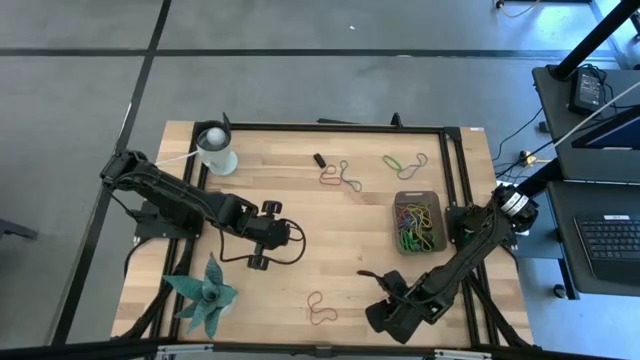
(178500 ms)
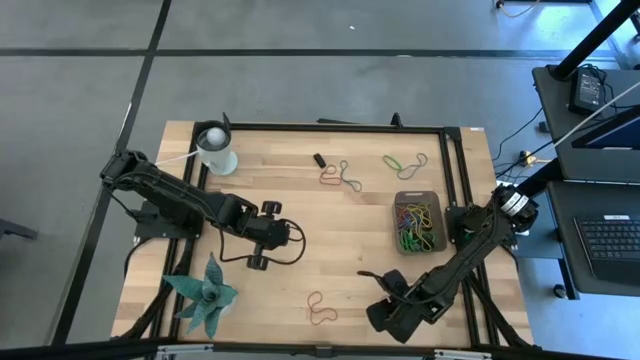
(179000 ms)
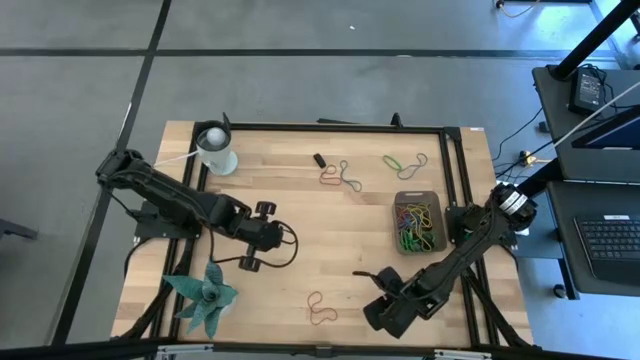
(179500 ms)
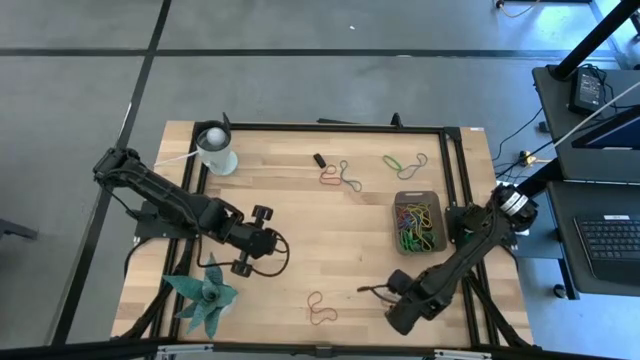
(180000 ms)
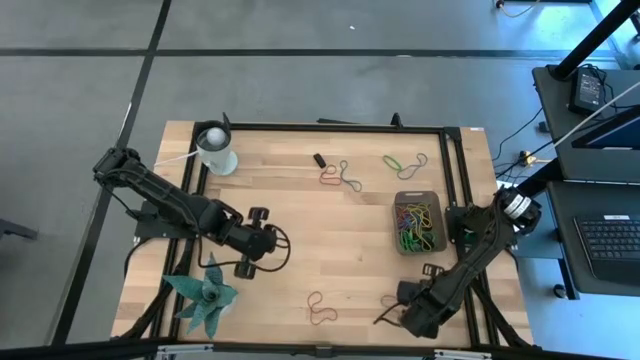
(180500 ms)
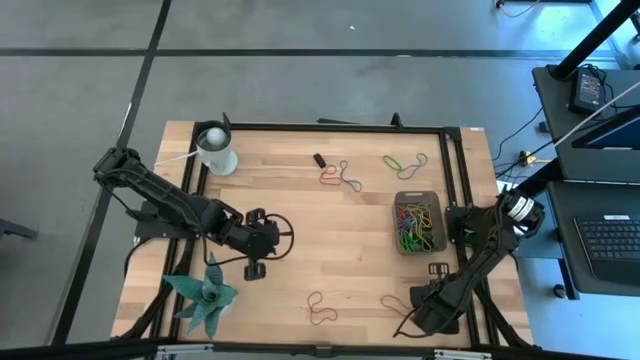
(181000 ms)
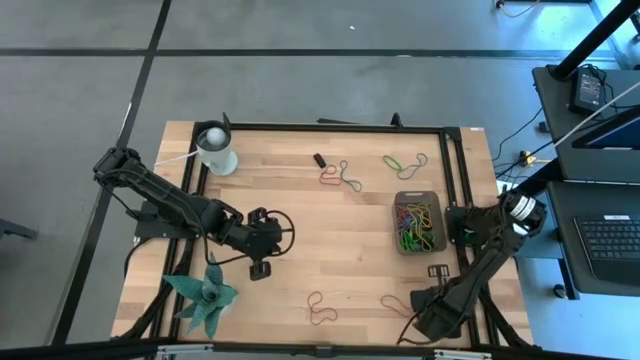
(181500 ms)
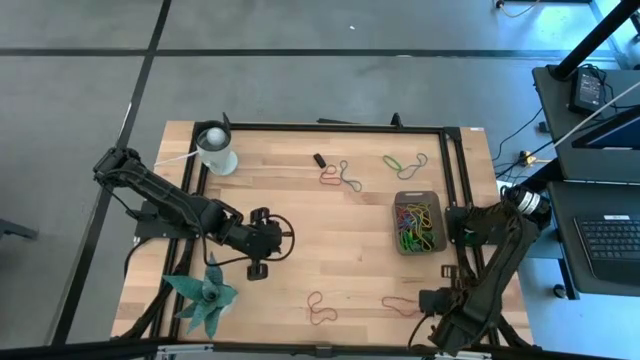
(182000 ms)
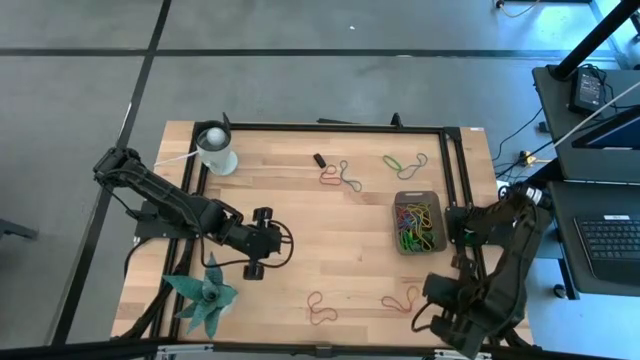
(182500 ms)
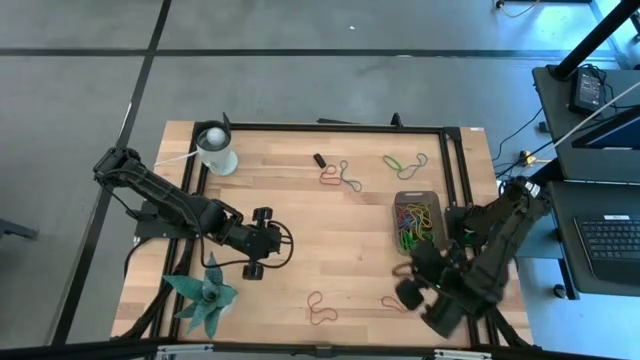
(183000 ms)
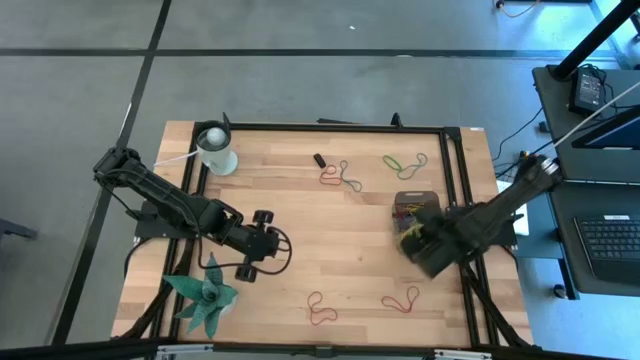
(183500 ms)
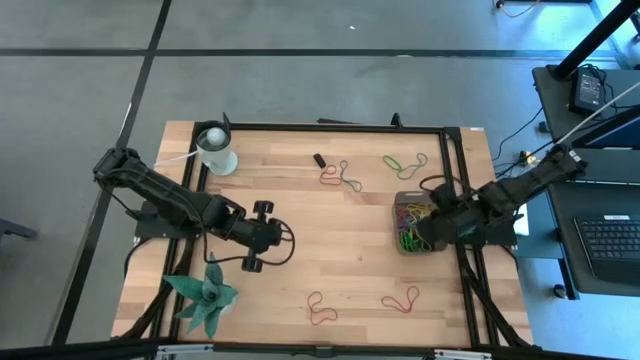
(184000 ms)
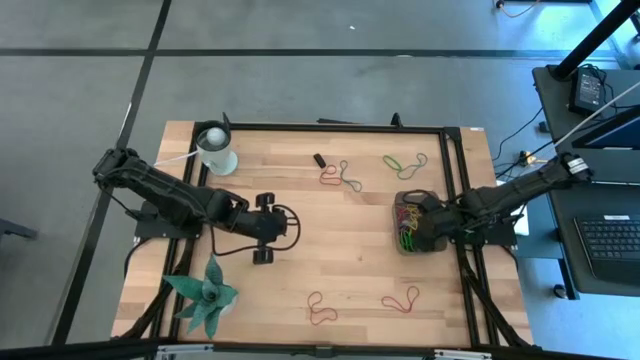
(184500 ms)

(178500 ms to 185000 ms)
Task: Pick and place rubber bands into bin
Put the yellow rubber band into the black bin

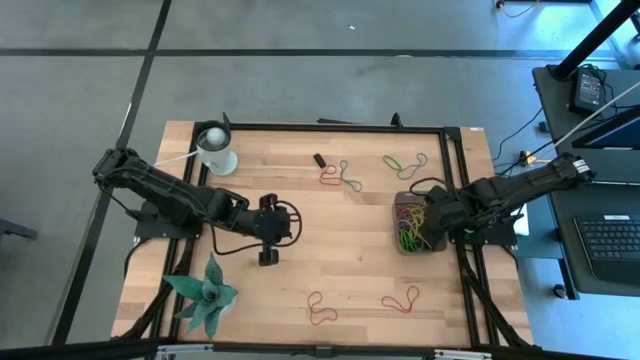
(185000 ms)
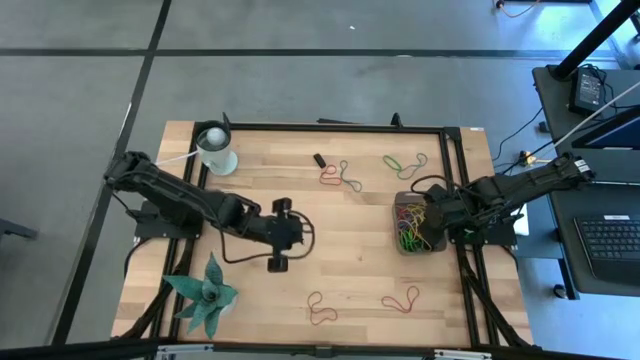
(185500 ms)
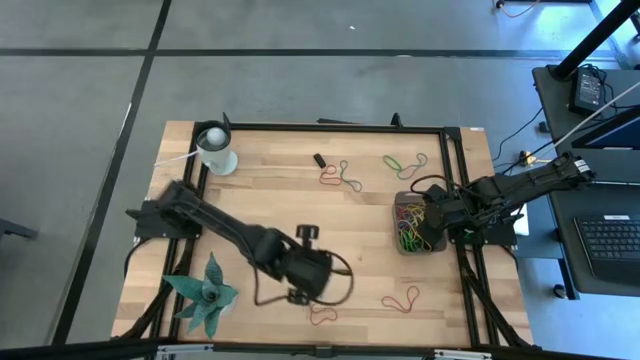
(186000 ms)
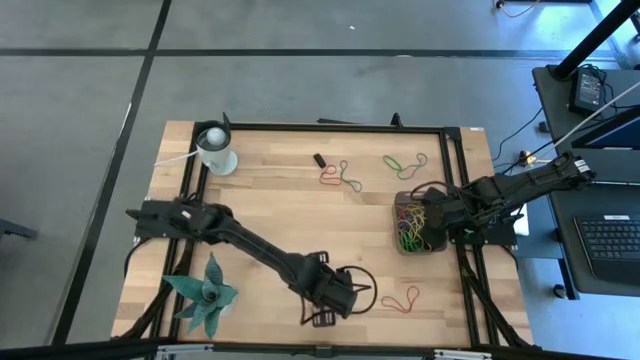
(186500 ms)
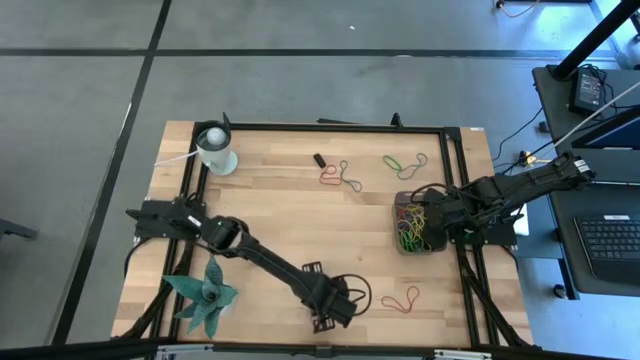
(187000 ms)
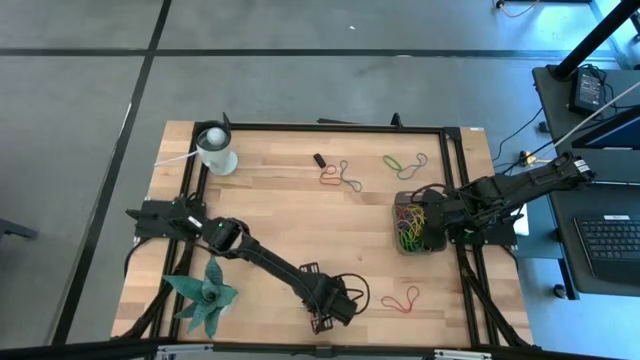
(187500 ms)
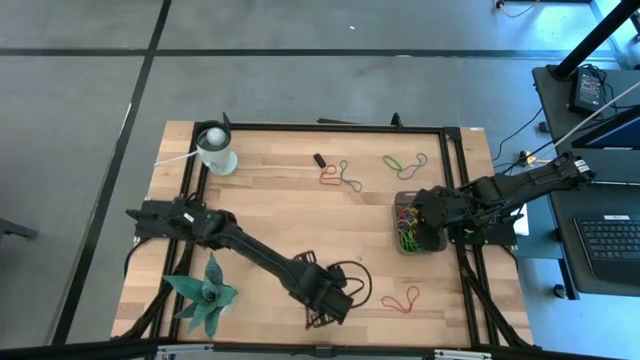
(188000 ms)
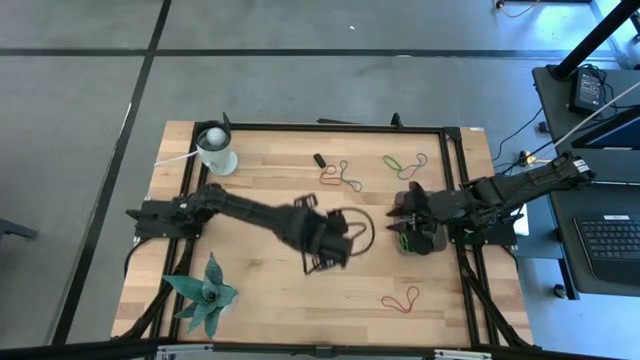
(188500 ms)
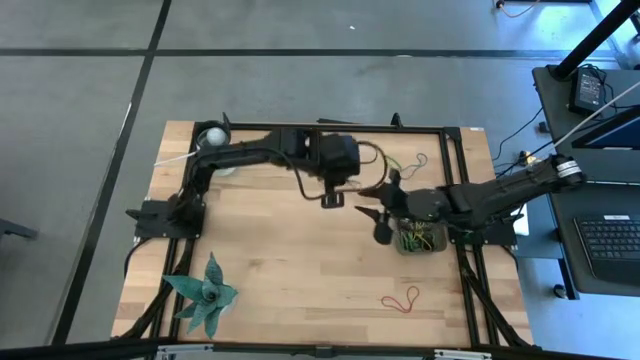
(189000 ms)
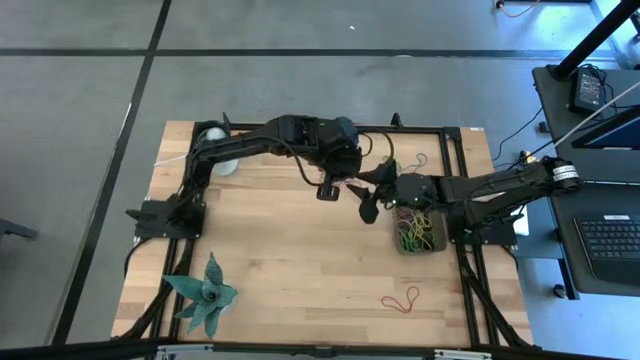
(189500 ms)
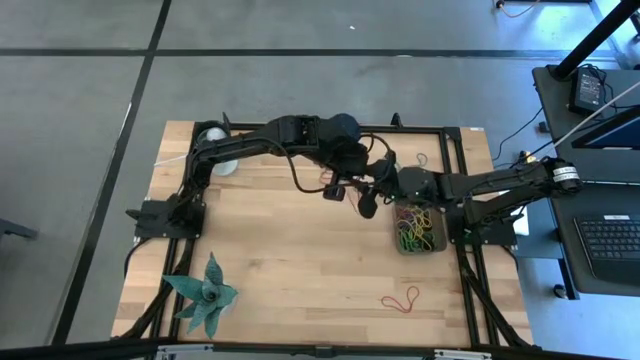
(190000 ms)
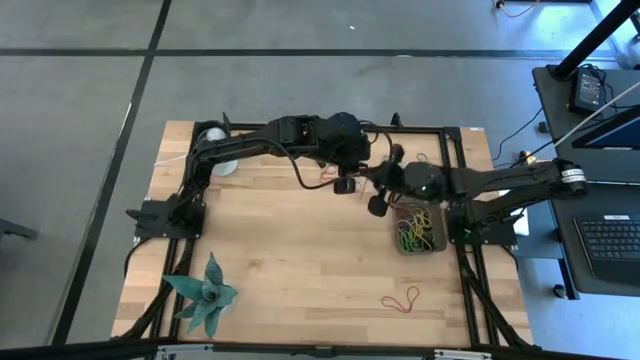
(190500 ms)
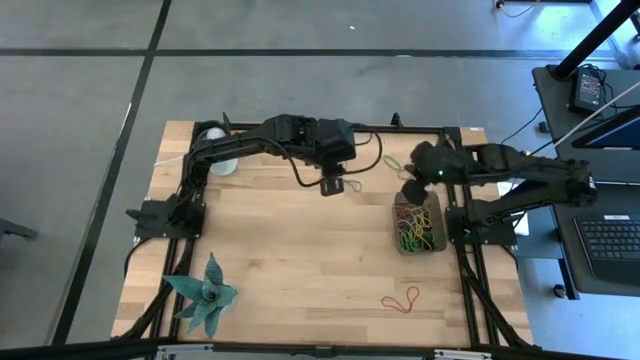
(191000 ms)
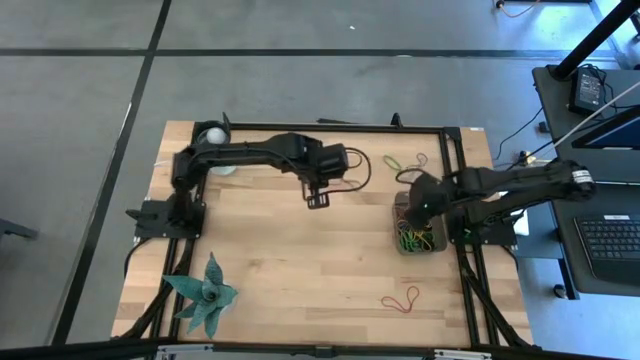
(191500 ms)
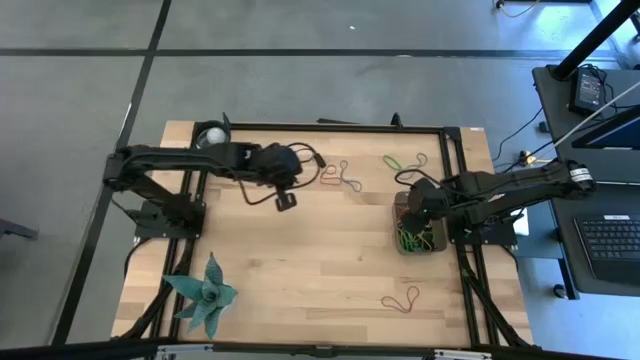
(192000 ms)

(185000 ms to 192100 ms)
Put the red rubber band into the black bin

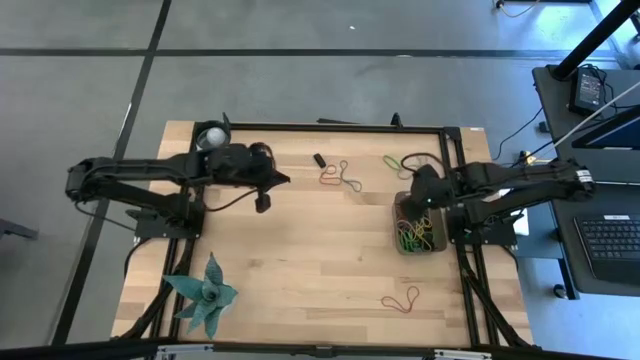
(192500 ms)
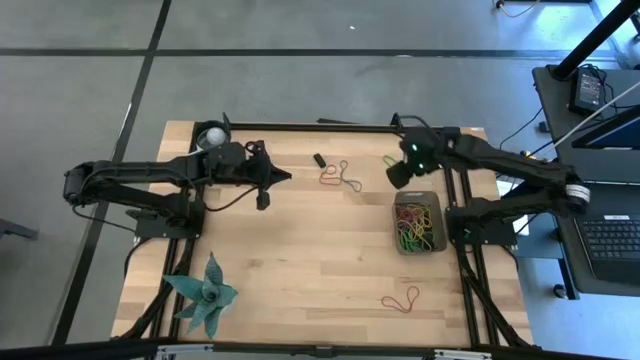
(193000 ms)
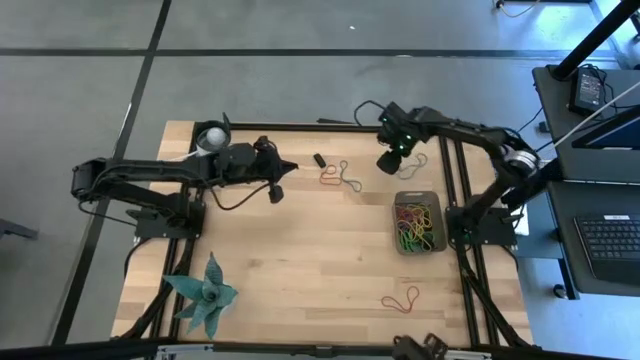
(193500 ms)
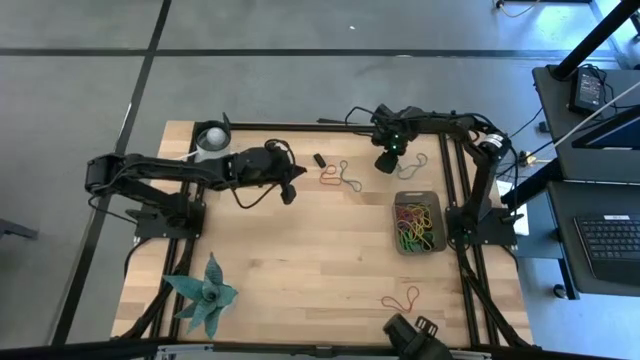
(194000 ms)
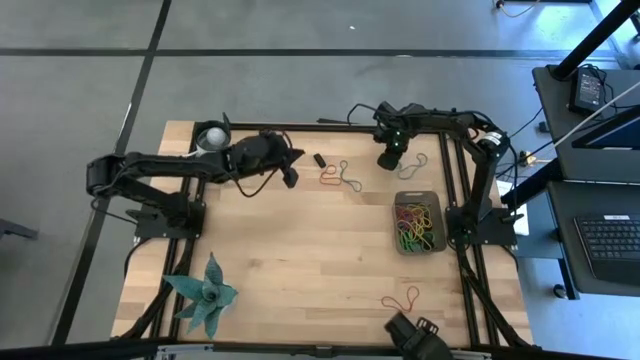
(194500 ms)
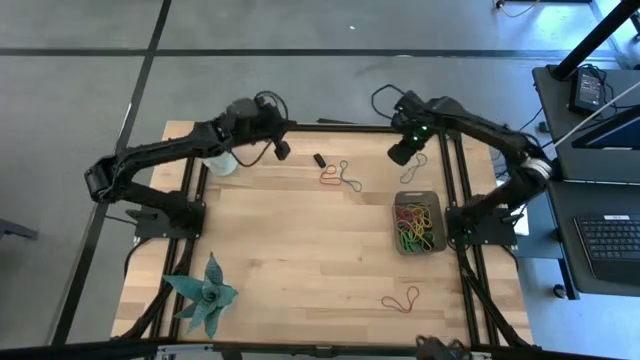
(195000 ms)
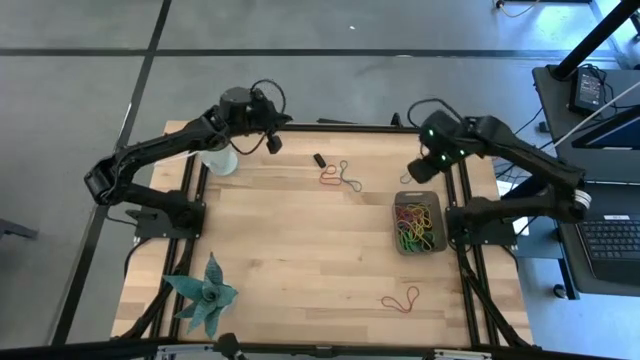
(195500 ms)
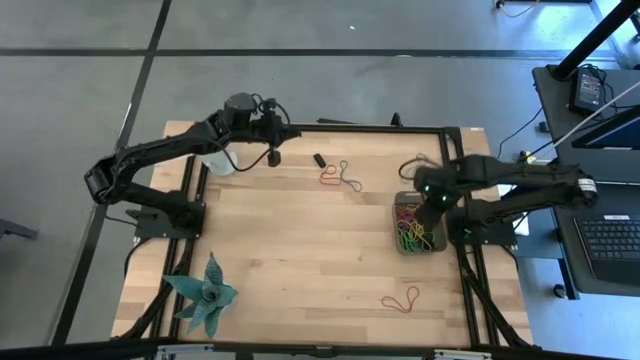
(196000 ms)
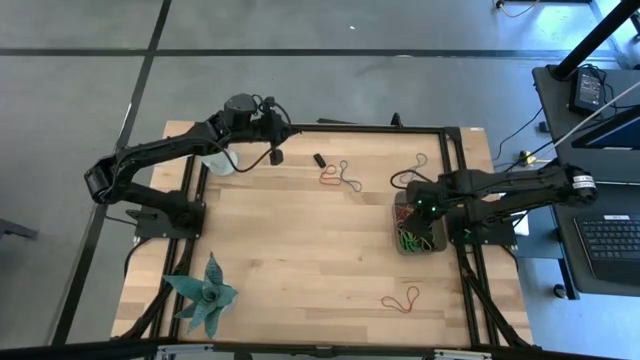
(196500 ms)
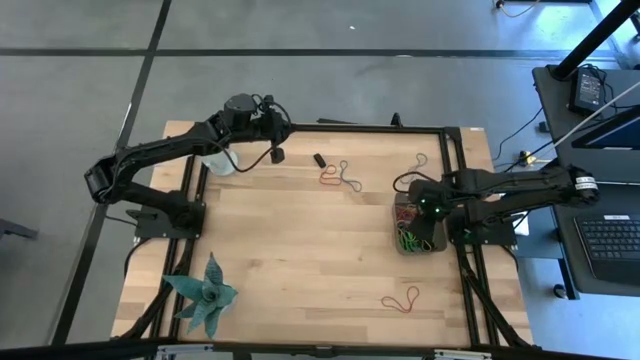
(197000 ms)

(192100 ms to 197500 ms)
Put the green rubber band into the black bin

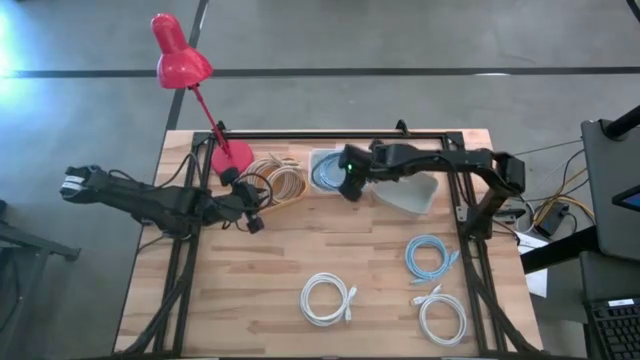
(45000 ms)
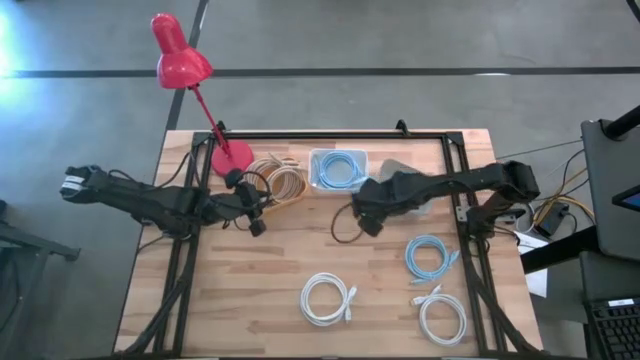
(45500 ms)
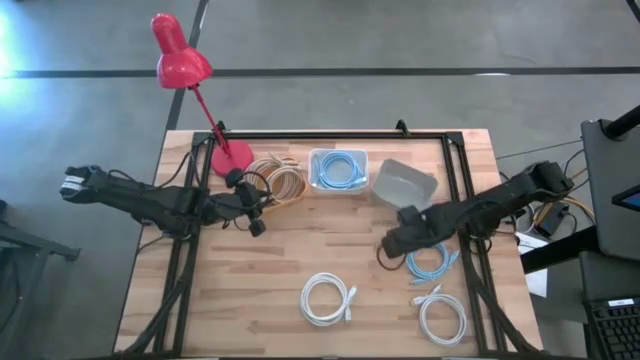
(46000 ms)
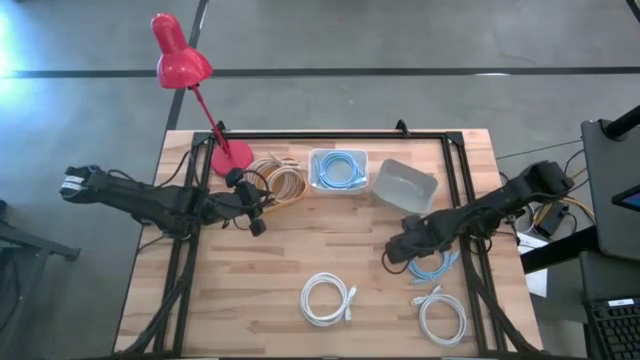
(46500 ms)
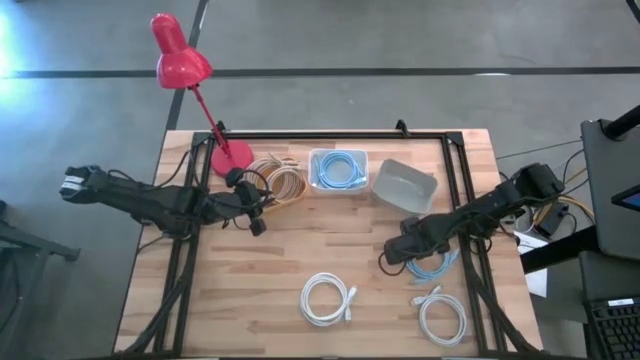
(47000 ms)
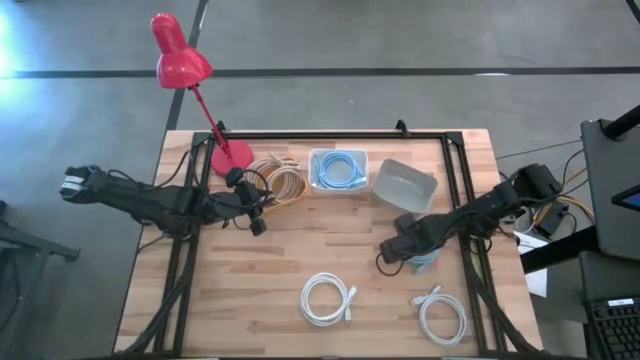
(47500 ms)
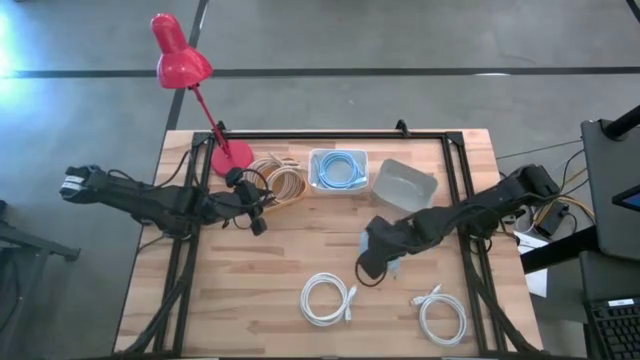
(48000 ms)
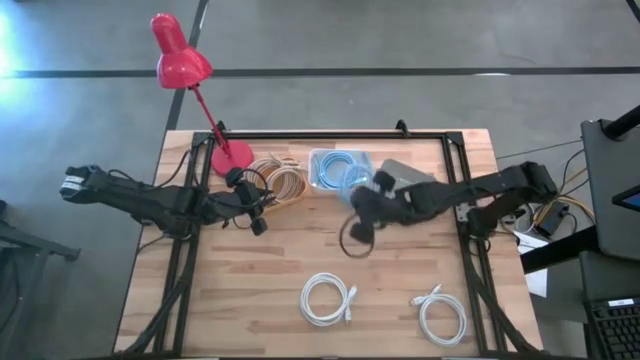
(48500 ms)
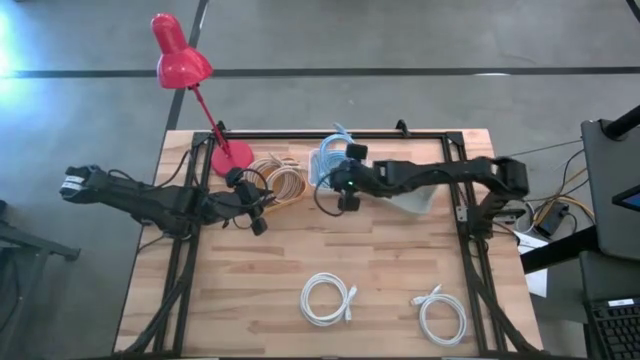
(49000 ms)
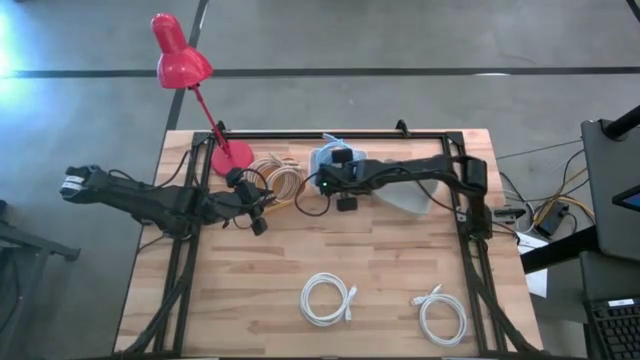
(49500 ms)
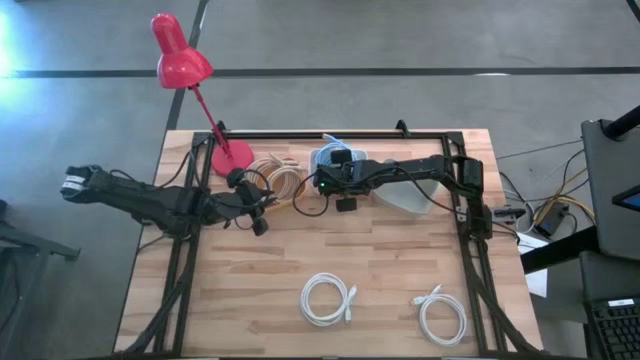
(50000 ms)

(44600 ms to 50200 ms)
Task: Pick & Place USB Port
Put the blue usb cable into the white bin
